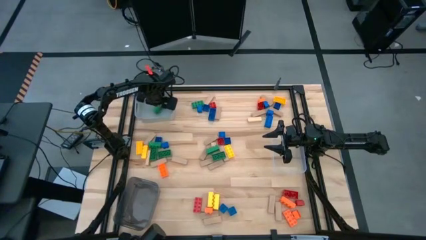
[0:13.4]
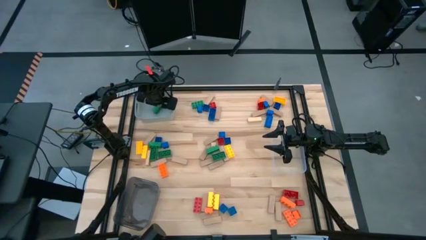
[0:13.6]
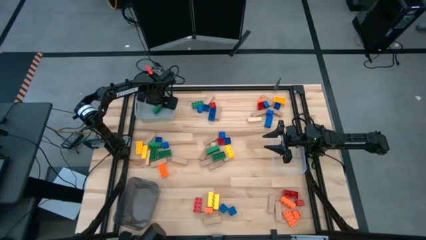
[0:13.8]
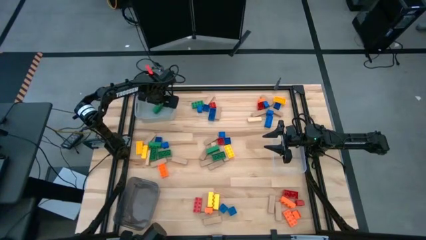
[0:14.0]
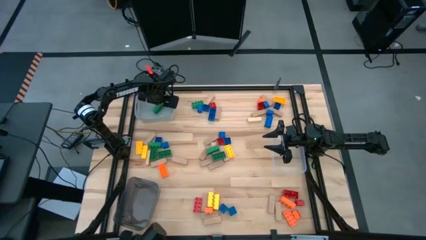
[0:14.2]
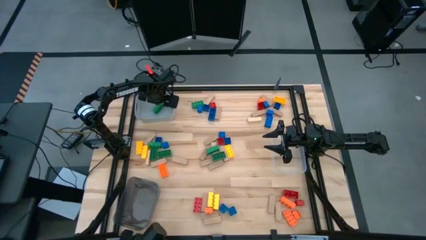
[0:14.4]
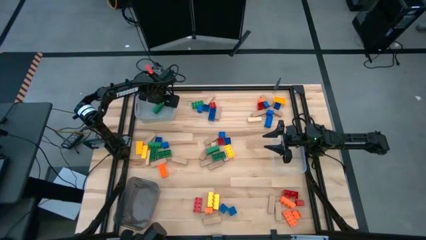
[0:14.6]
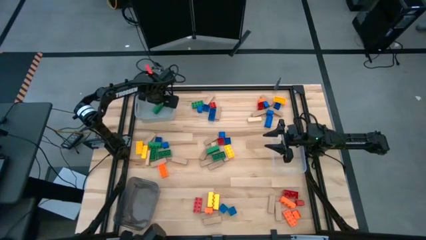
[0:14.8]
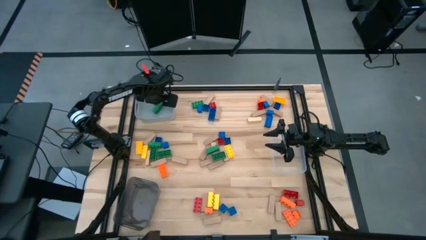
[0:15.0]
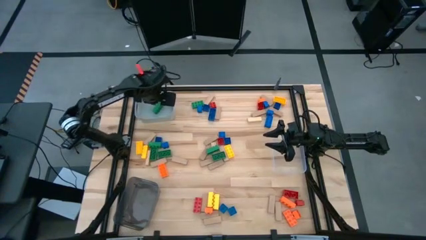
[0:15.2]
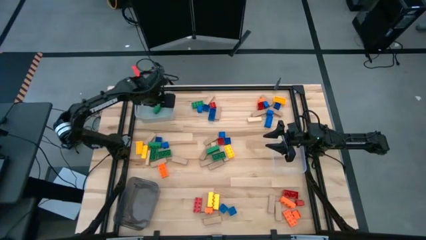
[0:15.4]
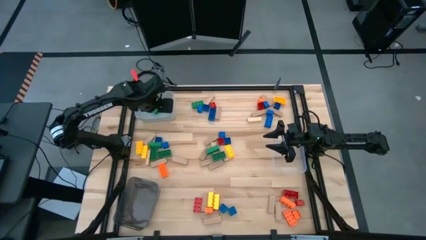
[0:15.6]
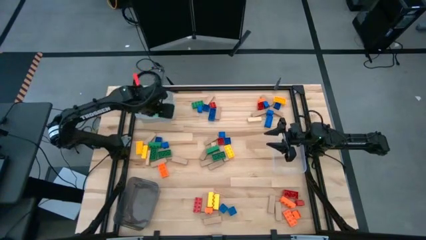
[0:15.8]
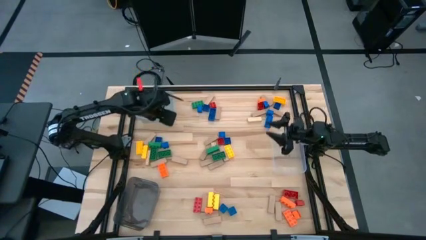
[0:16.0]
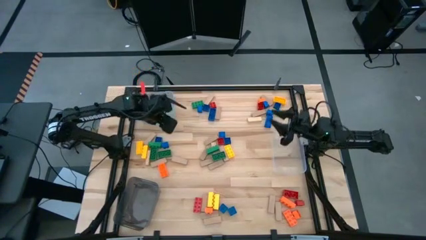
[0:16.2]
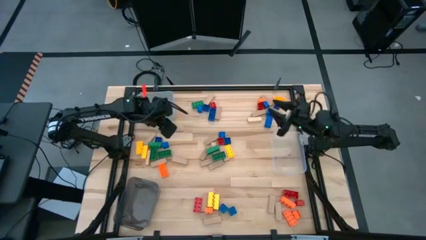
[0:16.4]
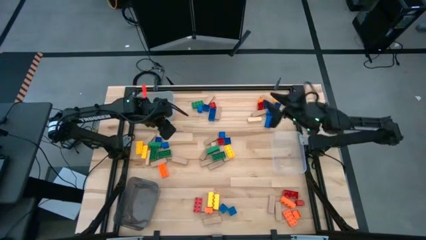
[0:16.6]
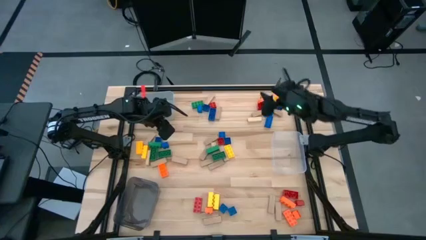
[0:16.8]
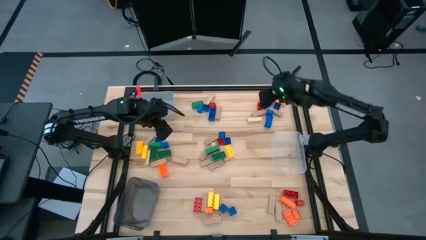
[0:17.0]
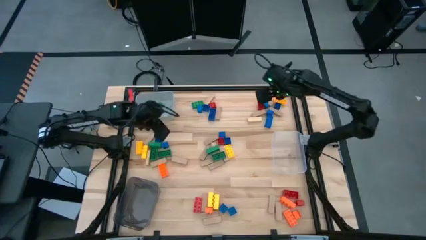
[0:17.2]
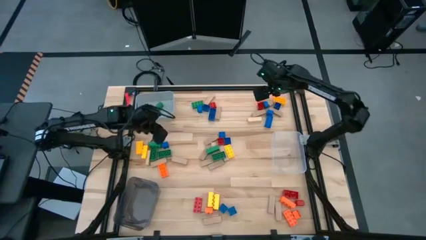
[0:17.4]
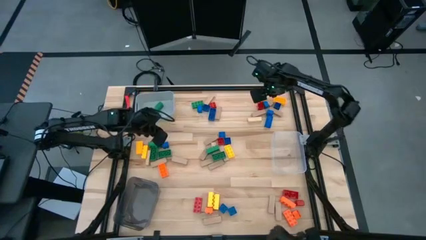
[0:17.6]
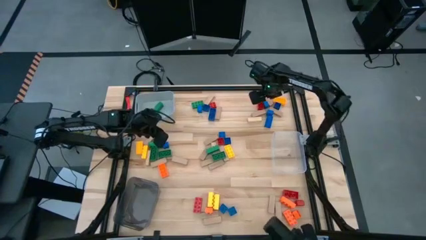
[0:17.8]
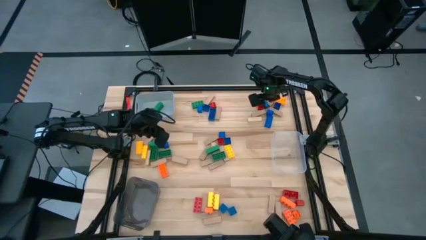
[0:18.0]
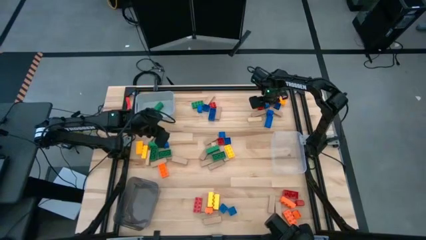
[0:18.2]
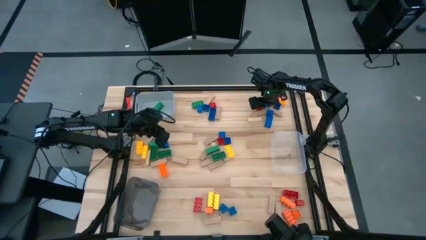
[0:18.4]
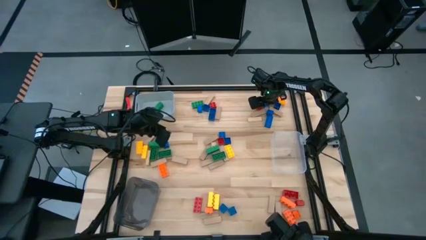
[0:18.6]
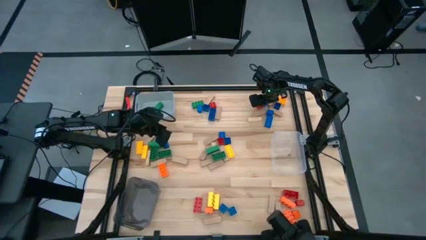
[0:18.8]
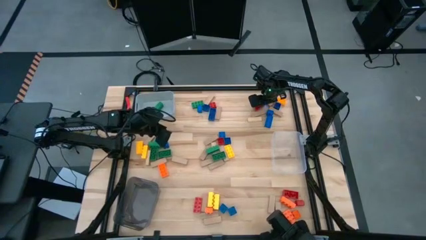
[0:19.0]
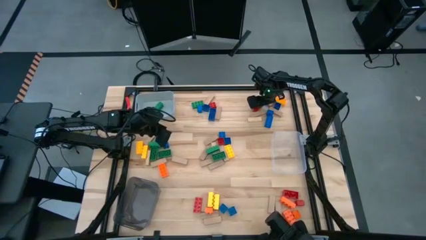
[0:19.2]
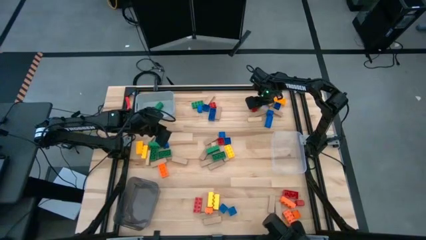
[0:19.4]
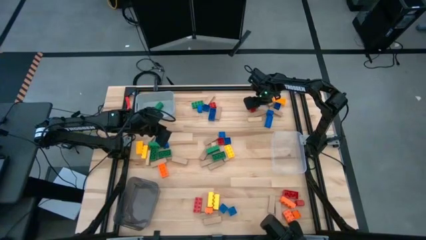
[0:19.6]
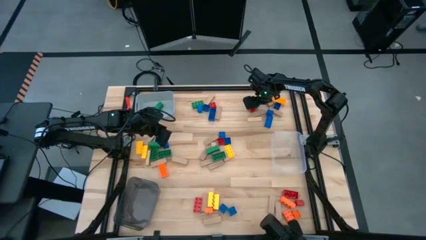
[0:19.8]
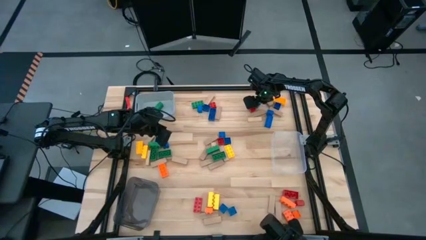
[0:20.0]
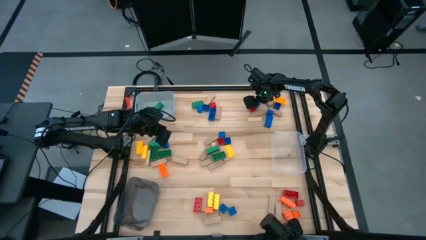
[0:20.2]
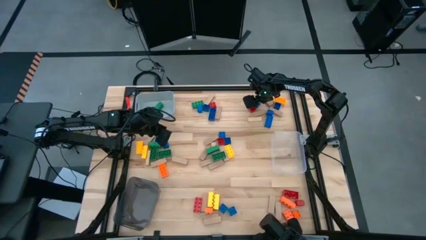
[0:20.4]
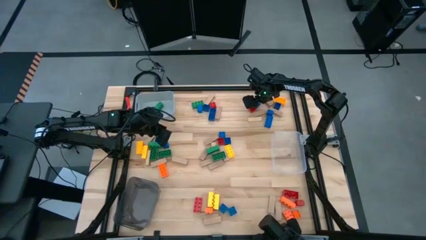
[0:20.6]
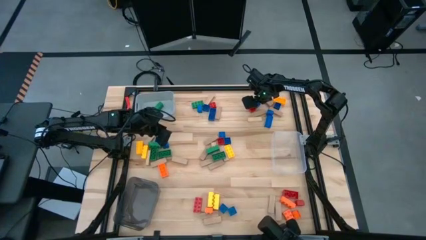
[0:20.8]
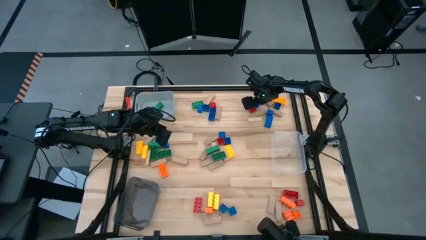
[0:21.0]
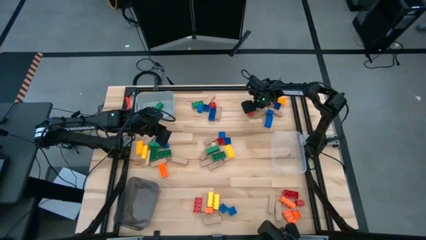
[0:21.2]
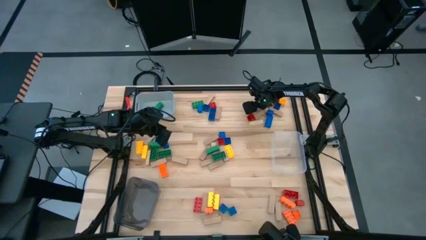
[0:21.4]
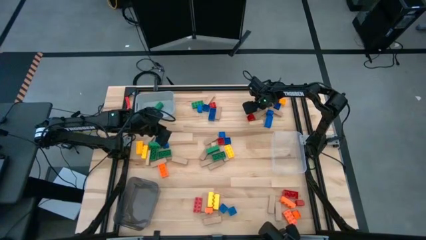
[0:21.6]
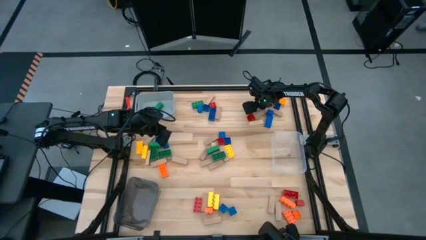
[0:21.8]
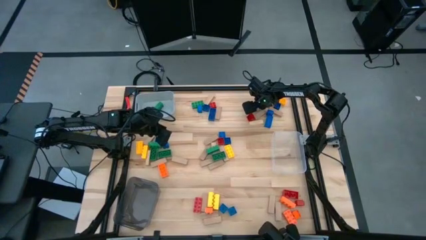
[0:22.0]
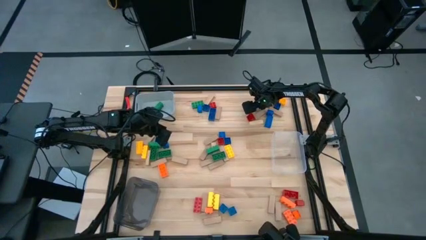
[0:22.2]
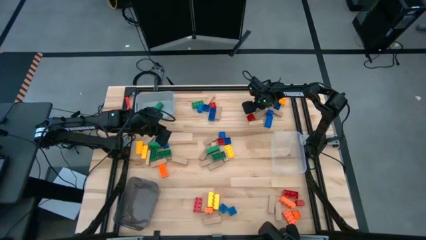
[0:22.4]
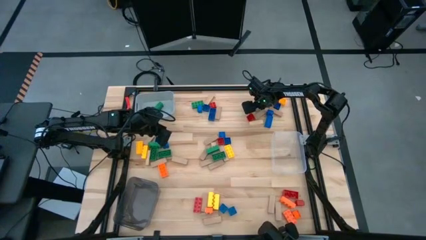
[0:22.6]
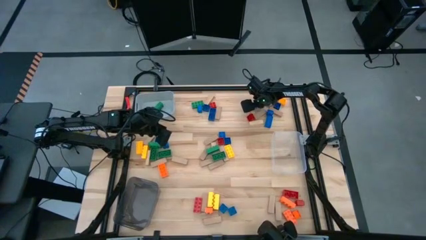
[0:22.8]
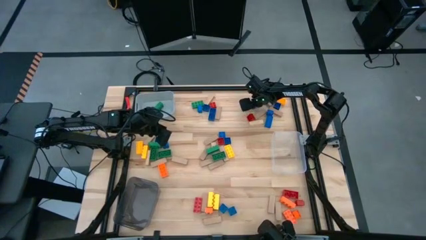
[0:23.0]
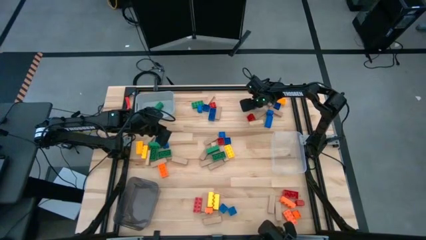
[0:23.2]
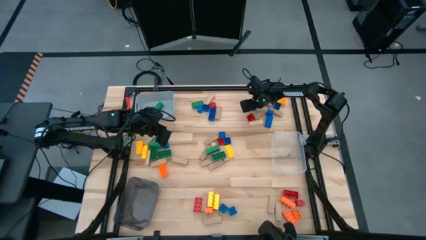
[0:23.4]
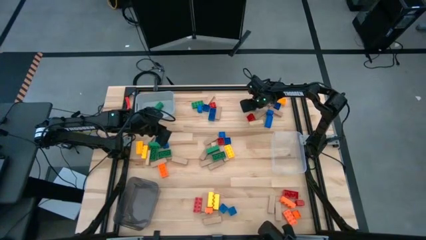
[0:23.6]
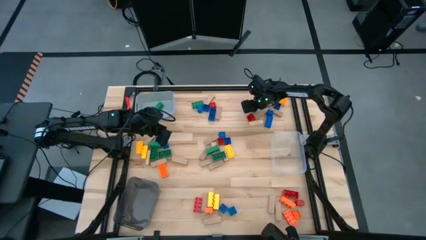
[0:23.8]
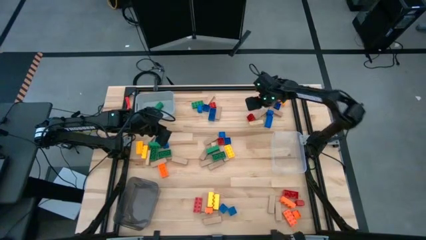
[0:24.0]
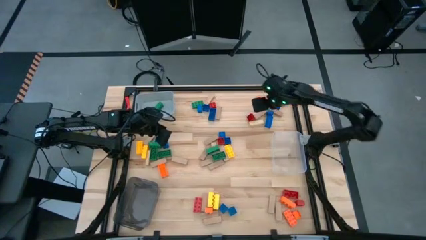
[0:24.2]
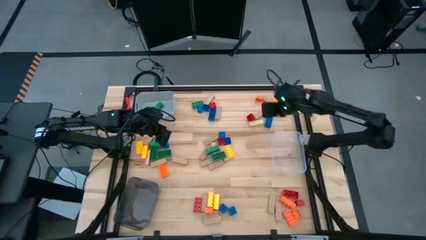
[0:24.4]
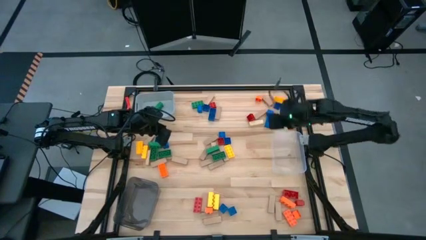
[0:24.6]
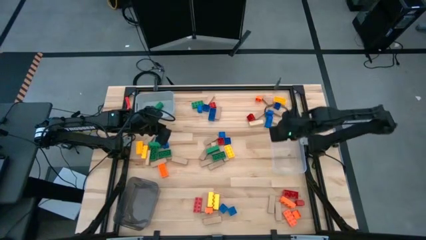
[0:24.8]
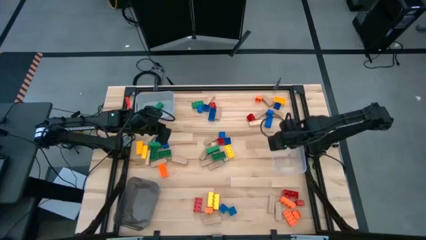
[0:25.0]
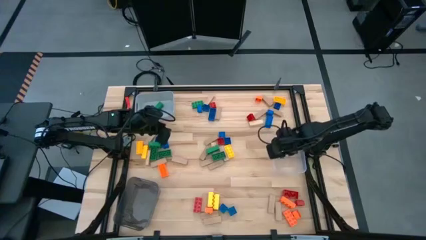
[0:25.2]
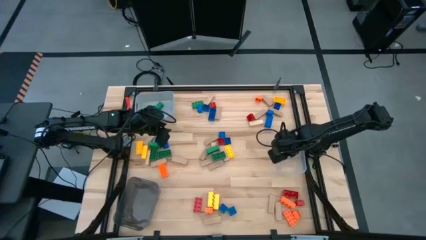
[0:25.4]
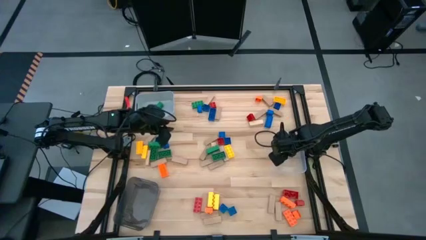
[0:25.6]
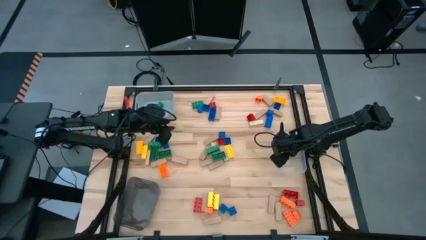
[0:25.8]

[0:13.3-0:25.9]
Task: Sort blocks by size
Put the small blue game piece into the transparent bin

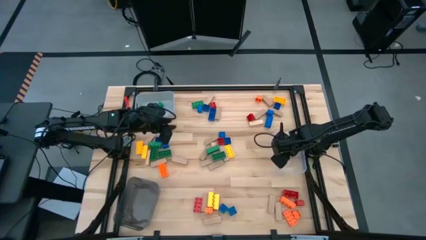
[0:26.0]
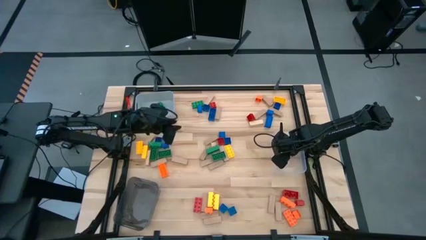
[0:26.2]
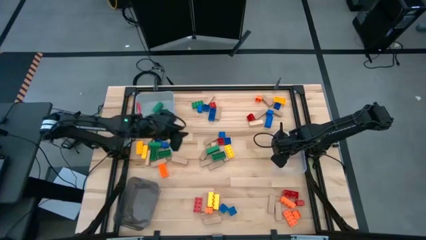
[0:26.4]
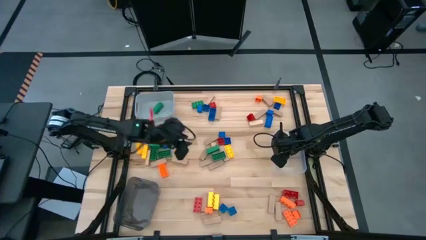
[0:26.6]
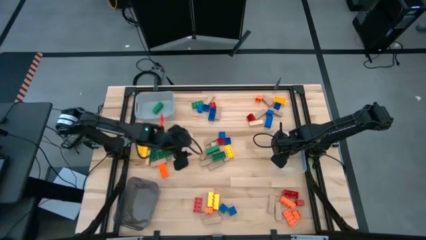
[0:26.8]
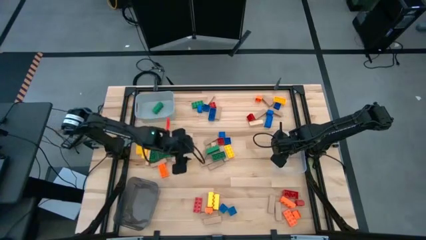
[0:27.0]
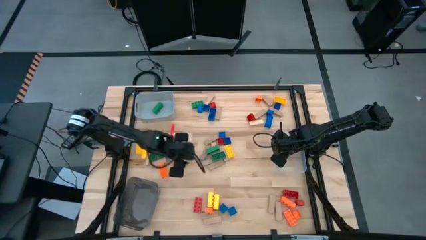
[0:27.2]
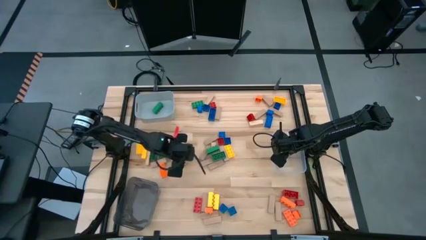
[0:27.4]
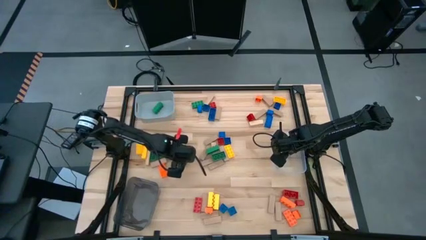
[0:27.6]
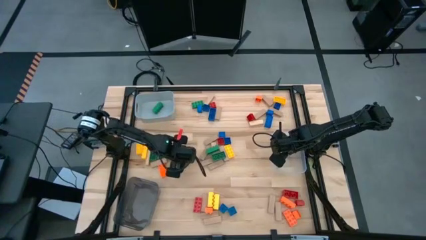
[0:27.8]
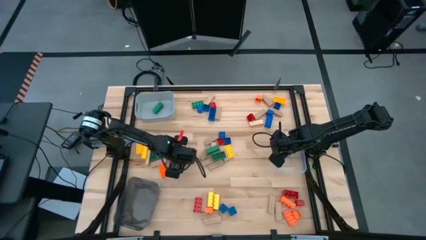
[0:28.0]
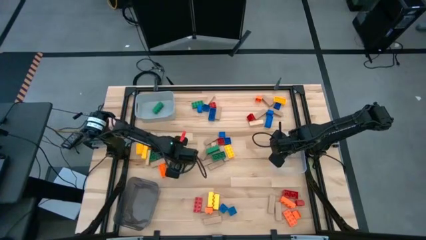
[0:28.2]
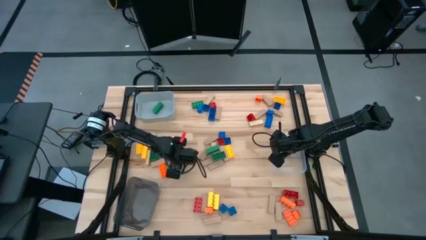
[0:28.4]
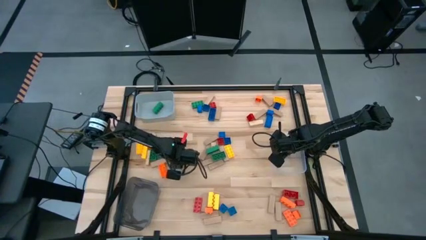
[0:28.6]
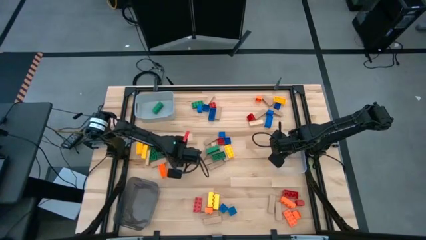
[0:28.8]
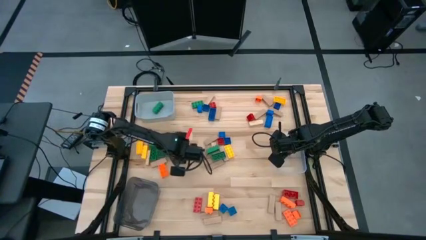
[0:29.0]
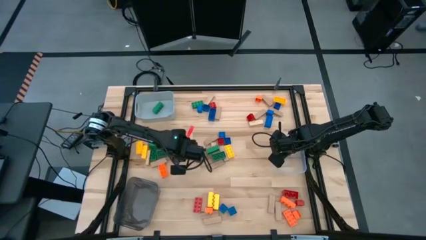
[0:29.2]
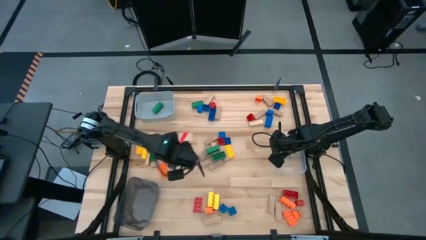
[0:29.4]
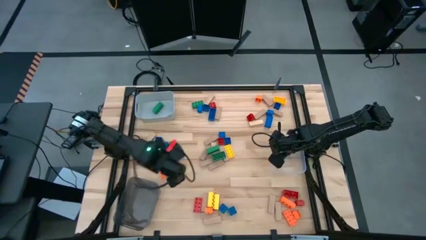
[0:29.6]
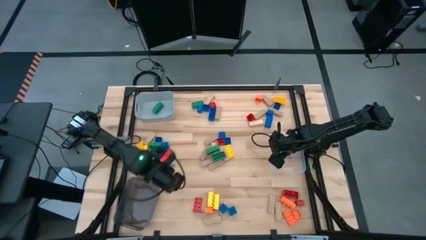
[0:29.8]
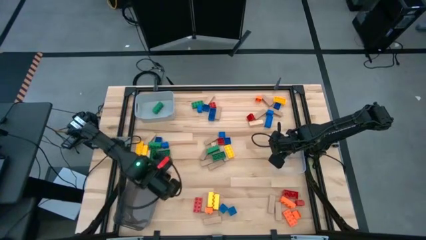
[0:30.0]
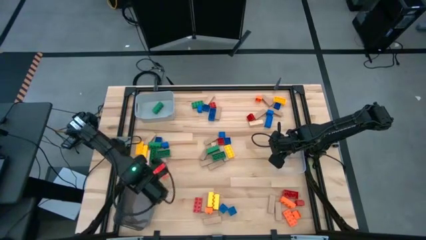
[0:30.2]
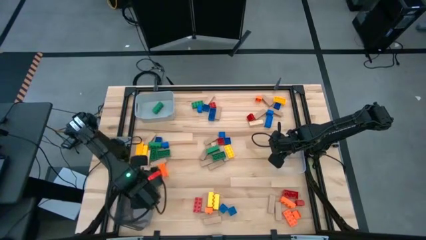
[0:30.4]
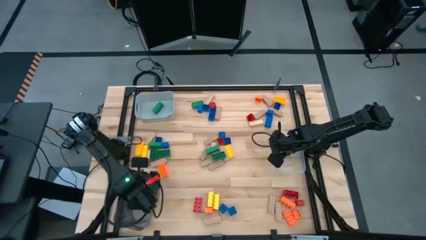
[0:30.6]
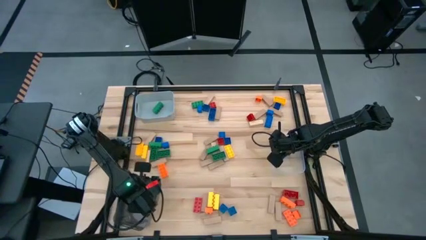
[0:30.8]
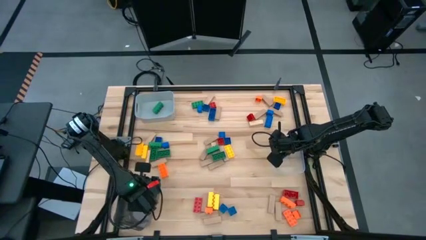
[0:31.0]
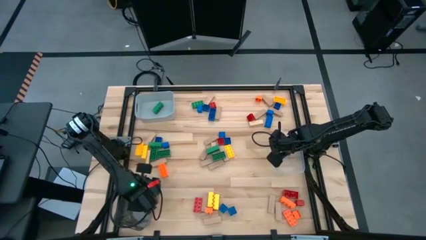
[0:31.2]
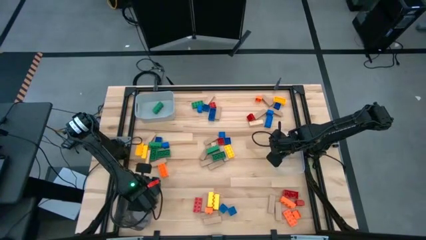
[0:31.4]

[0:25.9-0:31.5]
Put the brown block into the black bin
